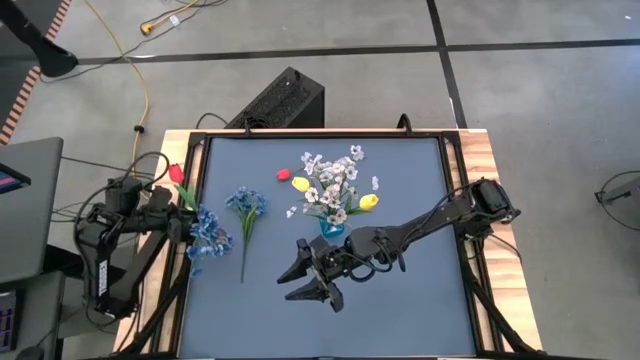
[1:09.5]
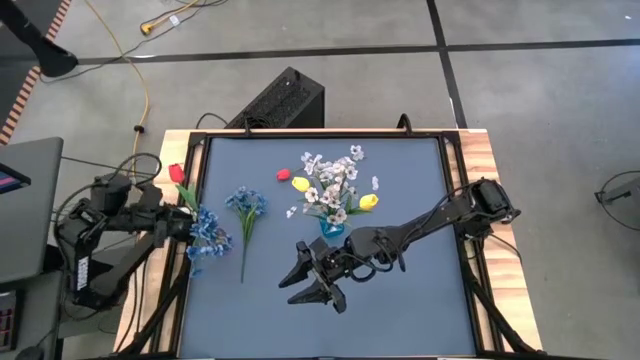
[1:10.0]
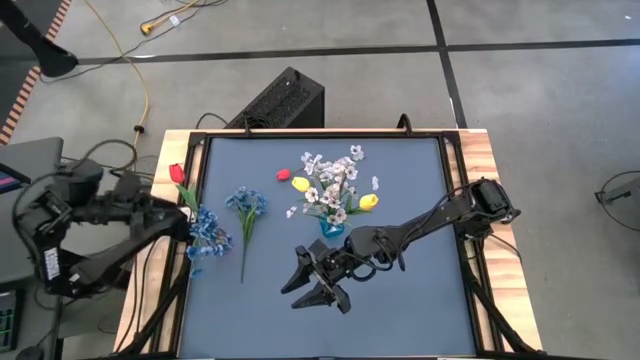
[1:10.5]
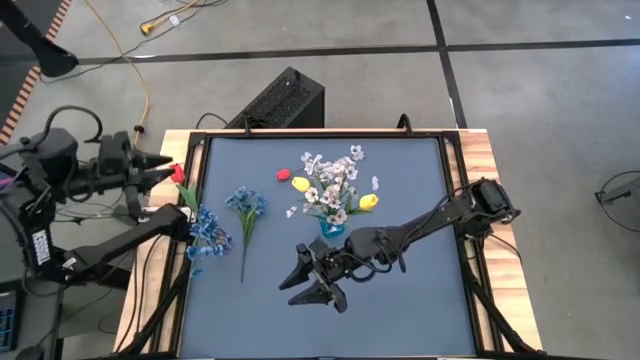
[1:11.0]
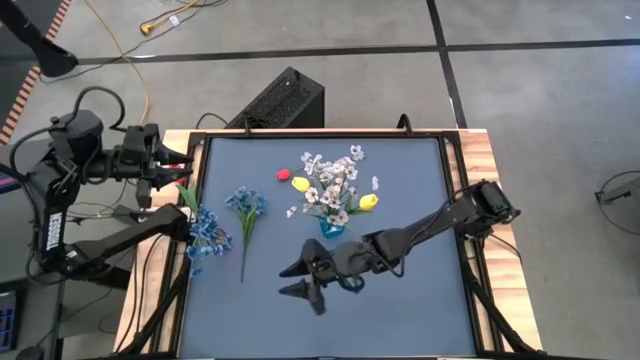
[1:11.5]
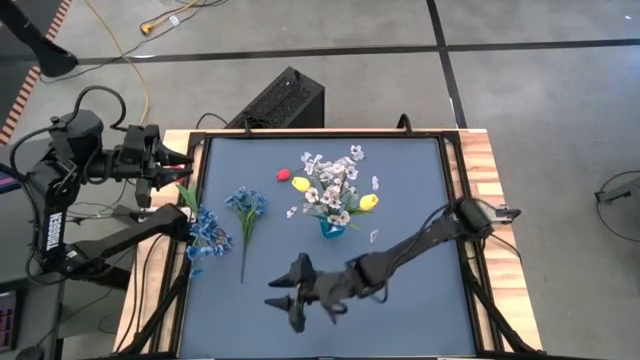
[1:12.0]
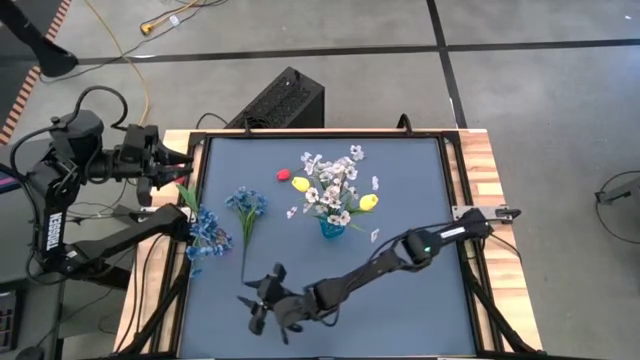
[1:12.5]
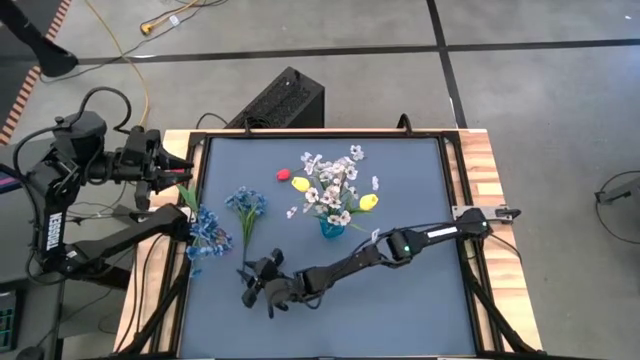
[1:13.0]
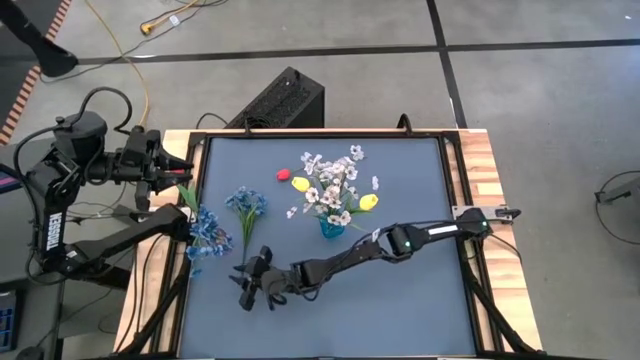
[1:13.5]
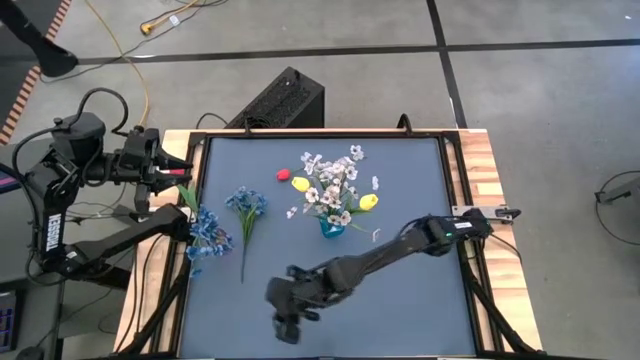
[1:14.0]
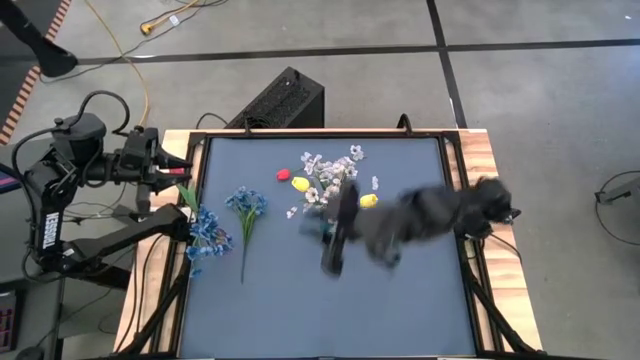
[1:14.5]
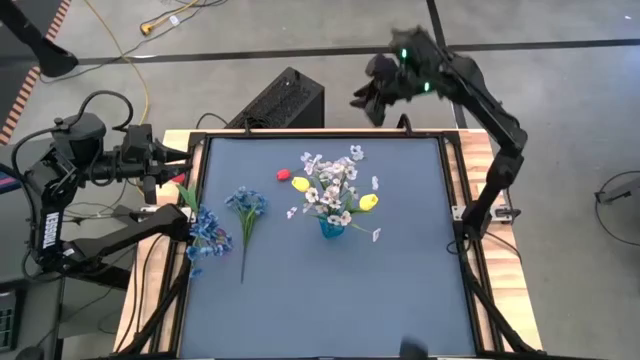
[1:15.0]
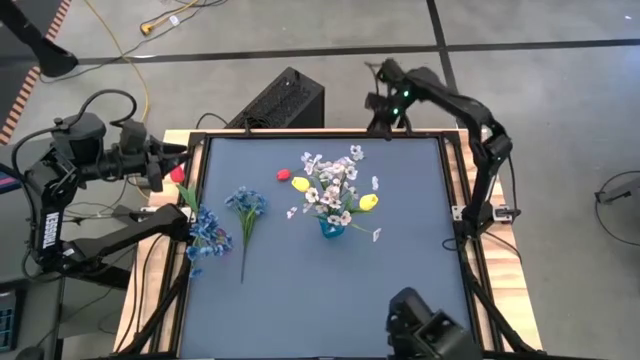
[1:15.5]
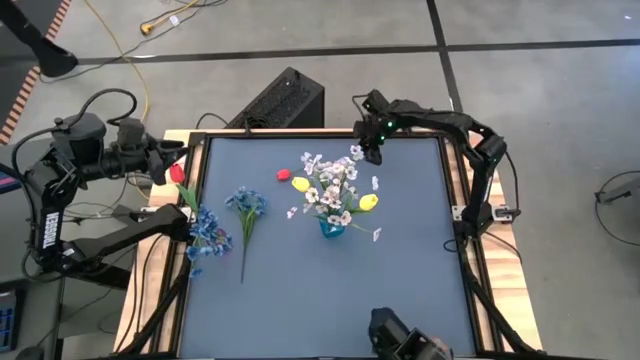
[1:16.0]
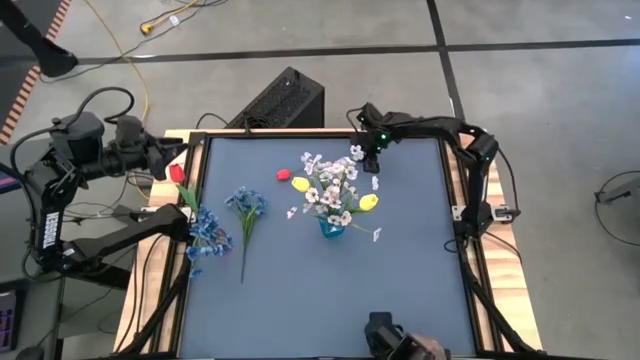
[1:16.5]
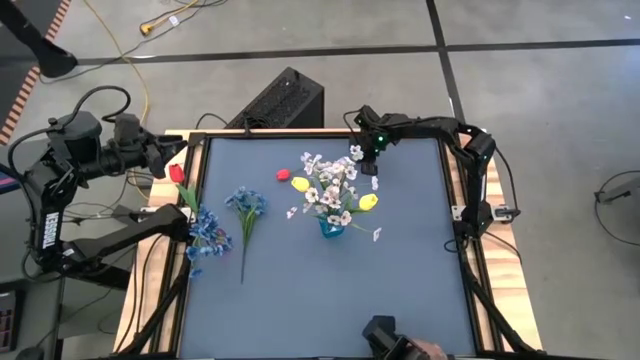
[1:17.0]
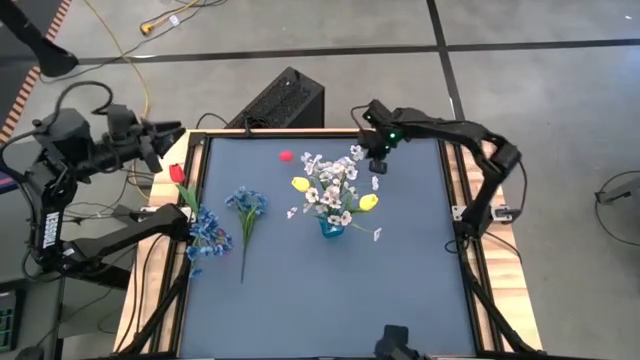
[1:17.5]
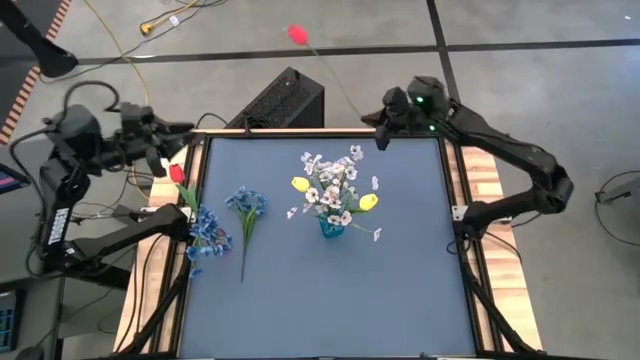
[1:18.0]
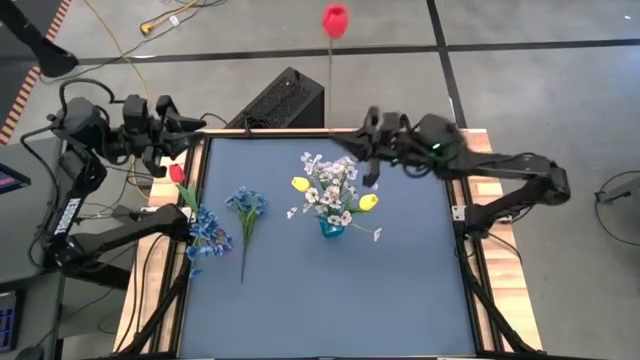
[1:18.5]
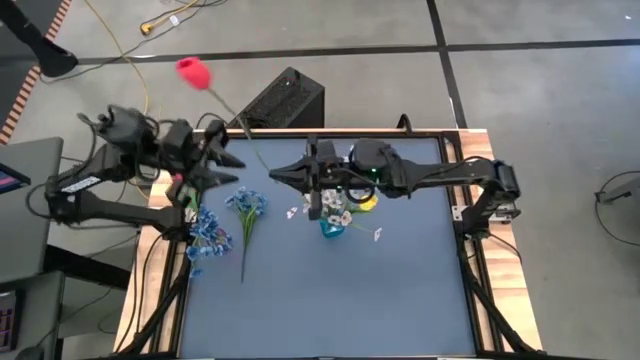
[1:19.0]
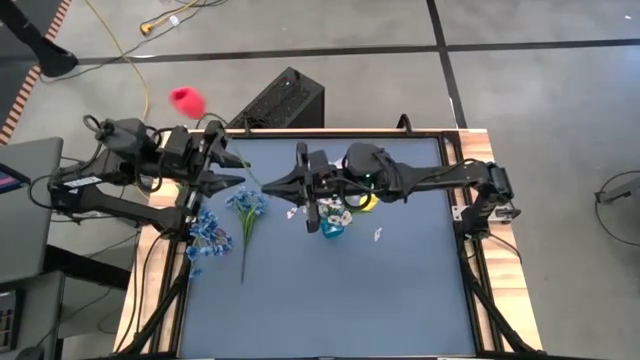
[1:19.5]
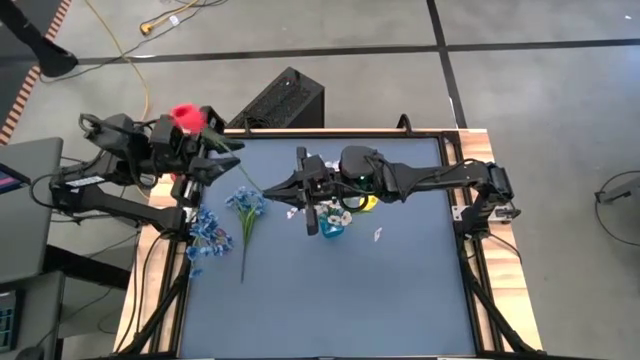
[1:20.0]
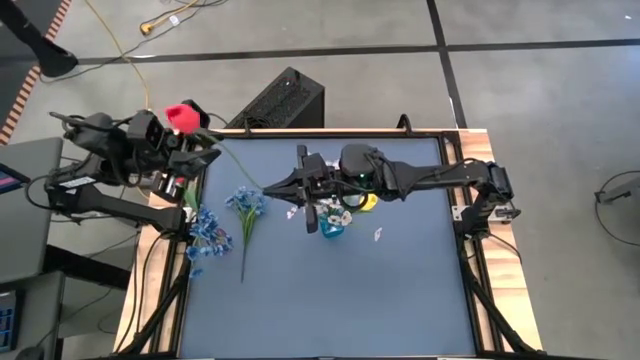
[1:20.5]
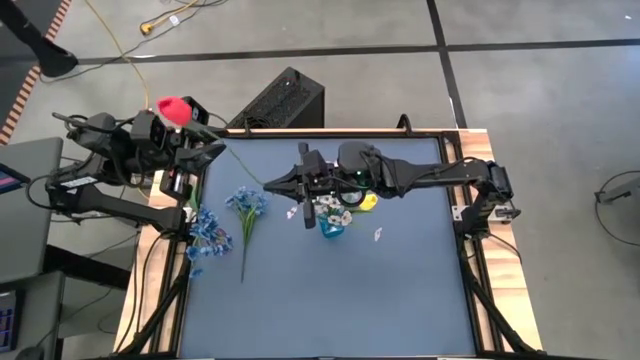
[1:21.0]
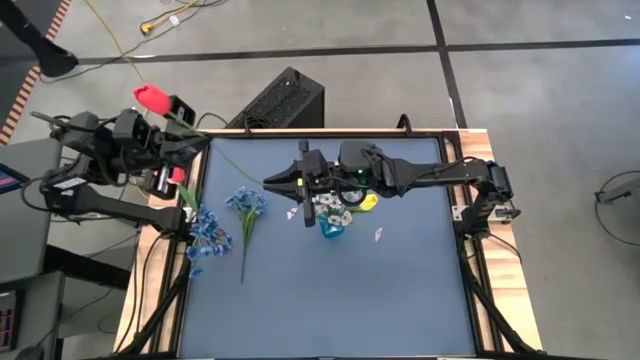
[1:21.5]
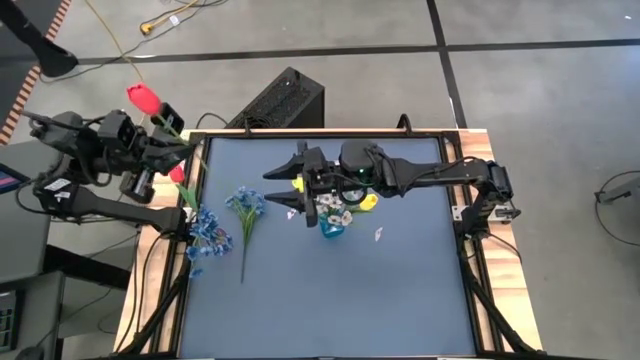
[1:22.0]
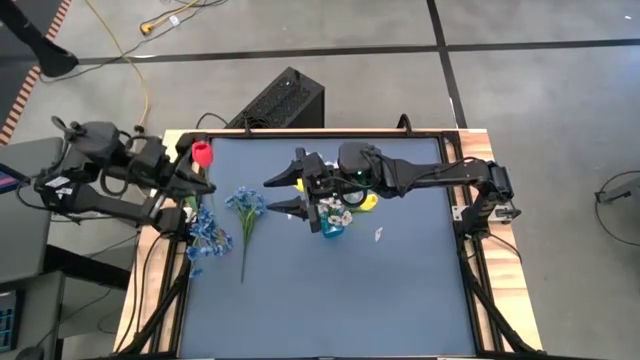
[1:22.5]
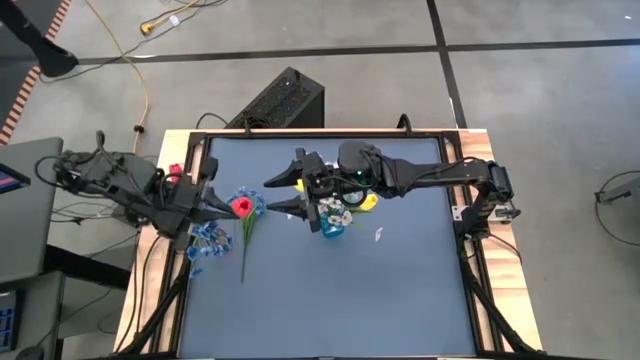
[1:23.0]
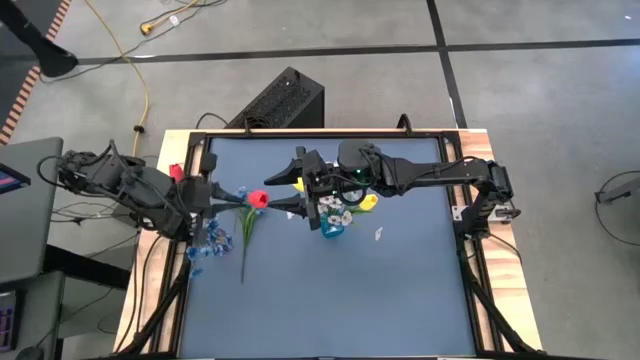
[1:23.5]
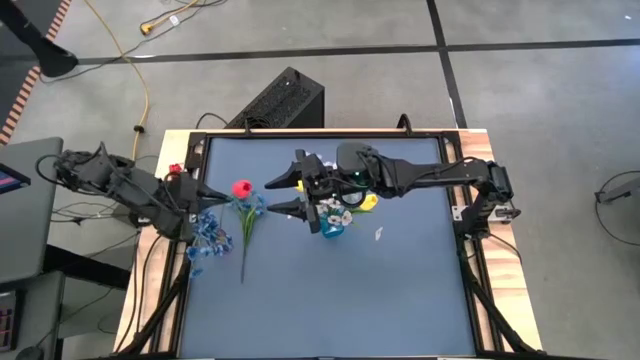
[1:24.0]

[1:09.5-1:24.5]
Task: Sort flowers into vase by color
Put the red tulip into the purple vase

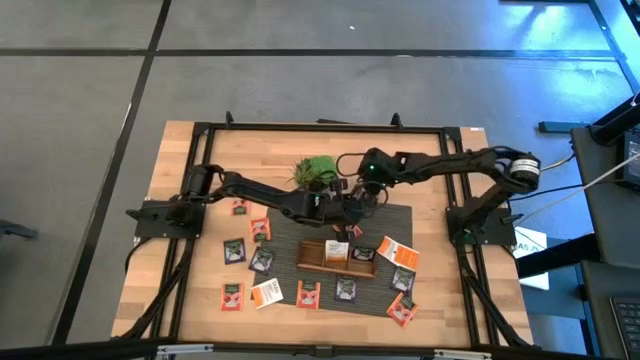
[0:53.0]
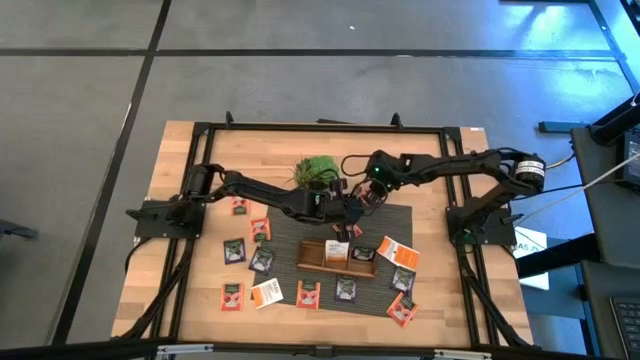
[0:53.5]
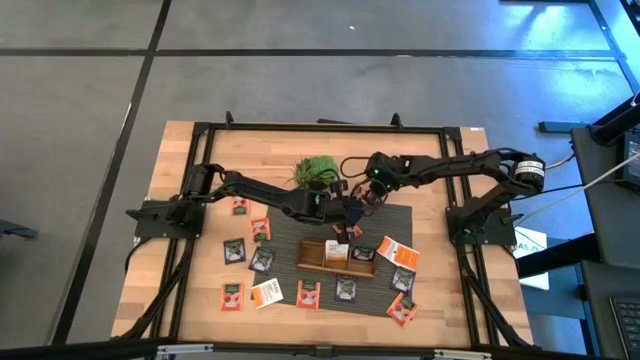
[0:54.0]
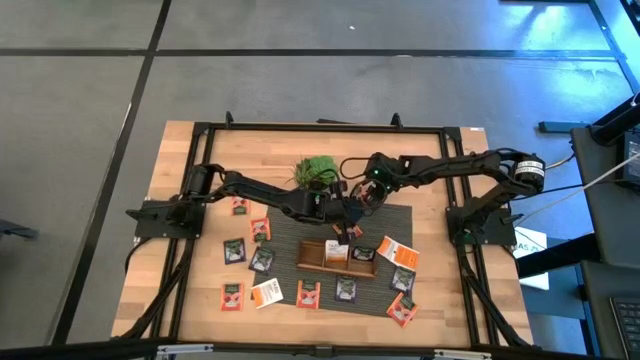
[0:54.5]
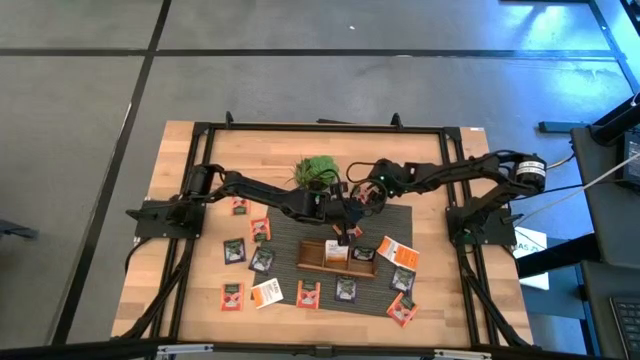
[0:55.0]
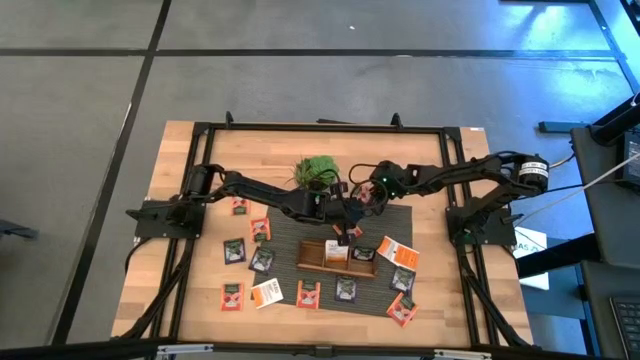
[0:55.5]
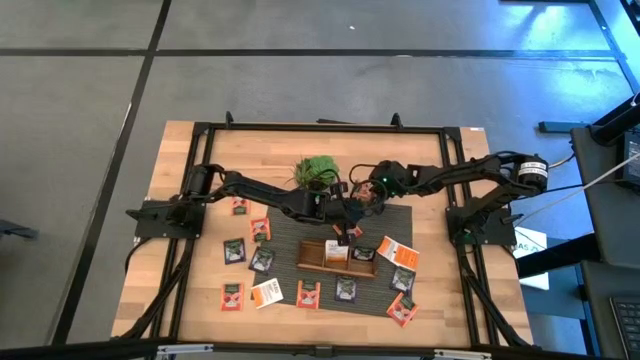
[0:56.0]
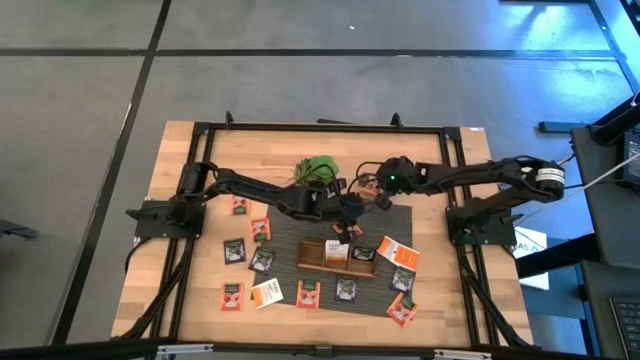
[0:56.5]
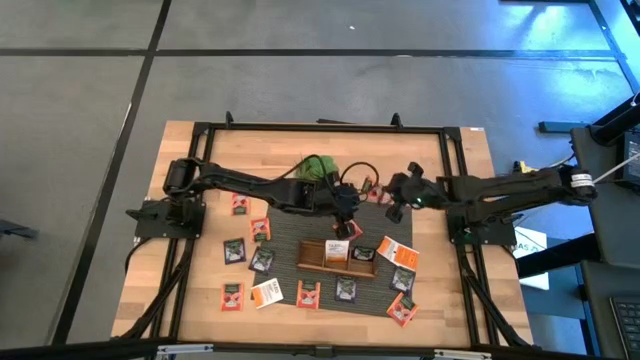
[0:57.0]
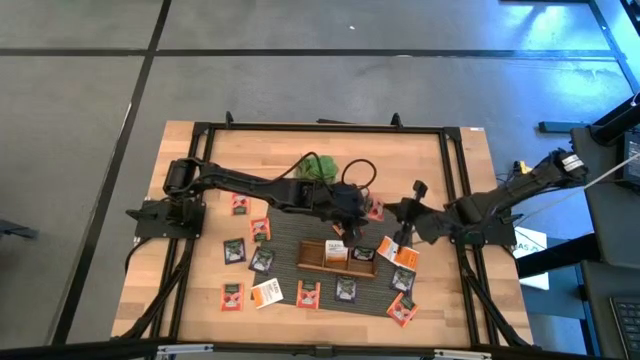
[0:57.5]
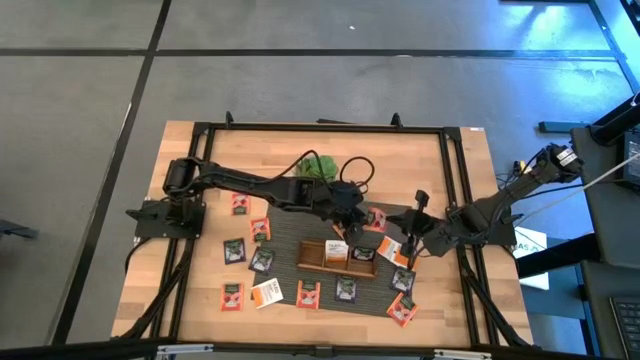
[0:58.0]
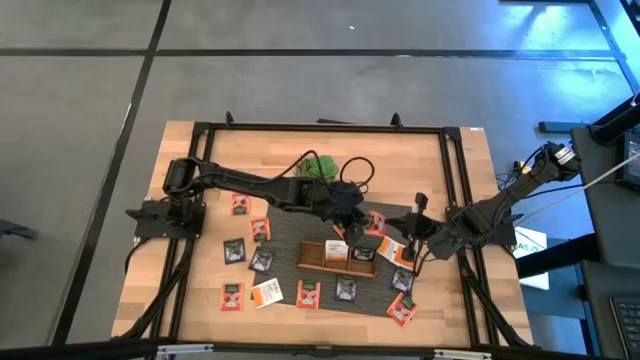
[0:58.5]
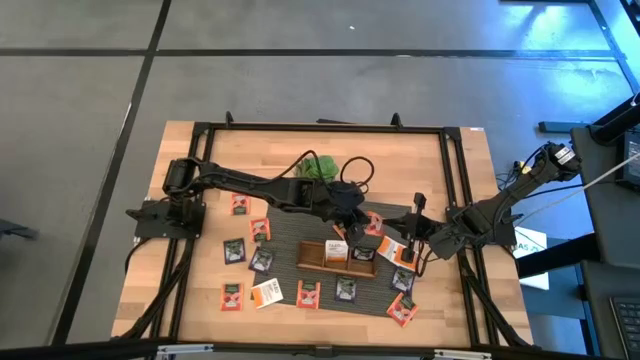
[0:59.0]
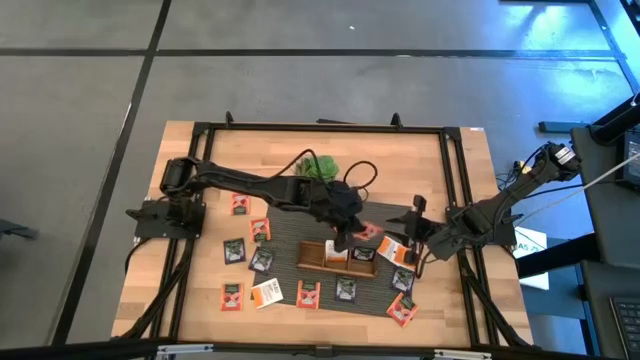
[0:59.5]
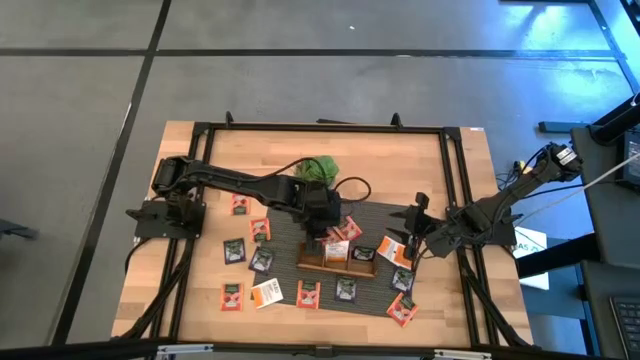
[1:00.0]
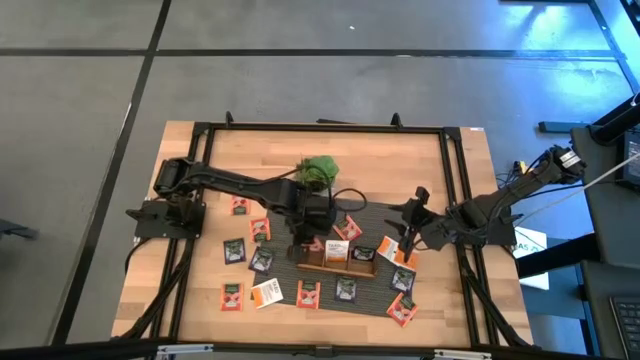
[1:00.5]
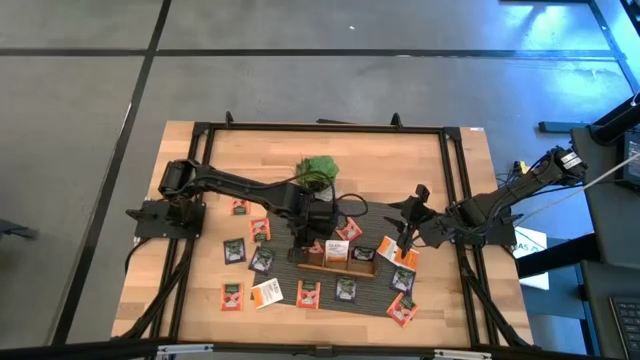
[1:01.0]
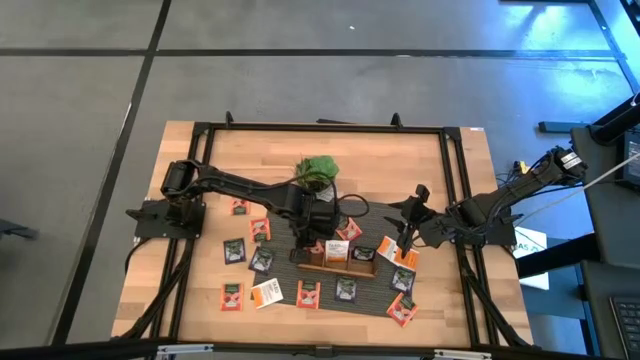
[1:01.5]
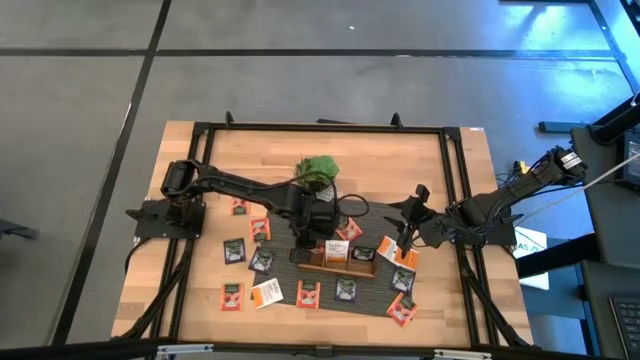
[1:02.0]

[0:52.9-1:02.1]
Task: Pick & Place Tea
Put the orange tea bag into the left section of the wooden organizer
